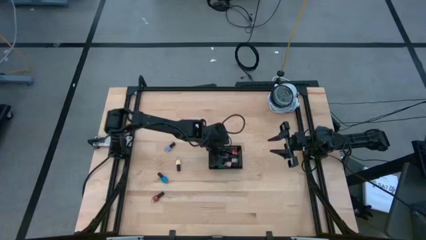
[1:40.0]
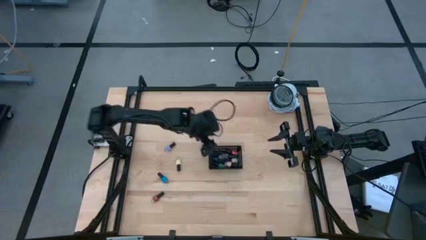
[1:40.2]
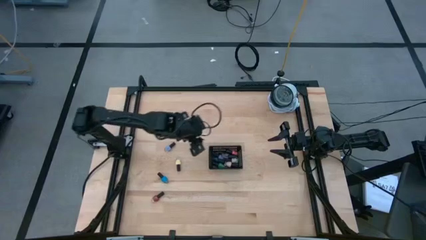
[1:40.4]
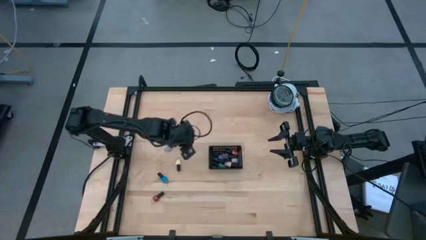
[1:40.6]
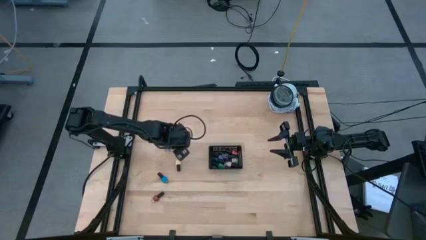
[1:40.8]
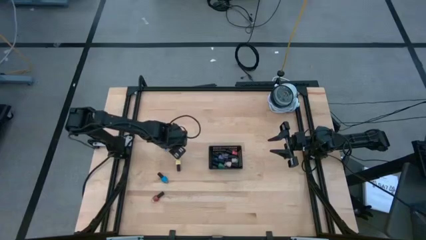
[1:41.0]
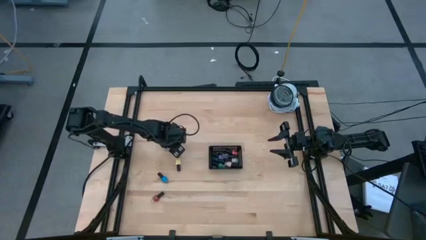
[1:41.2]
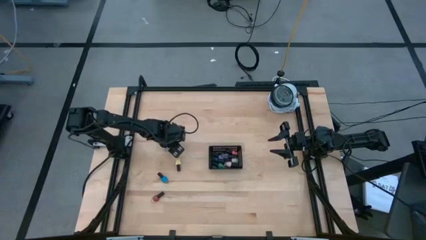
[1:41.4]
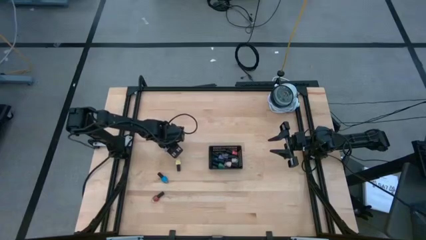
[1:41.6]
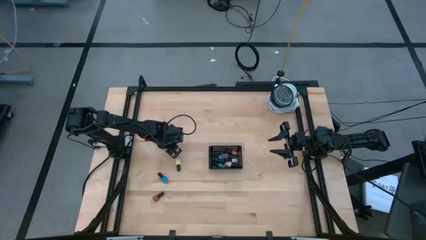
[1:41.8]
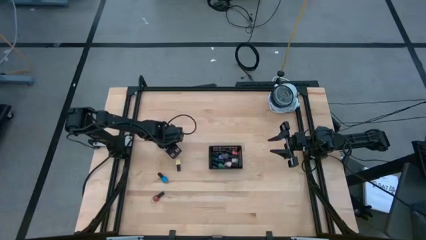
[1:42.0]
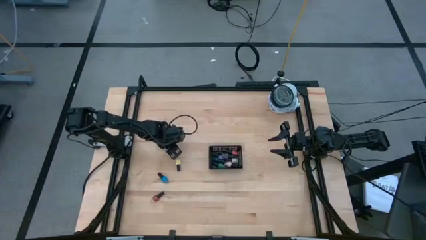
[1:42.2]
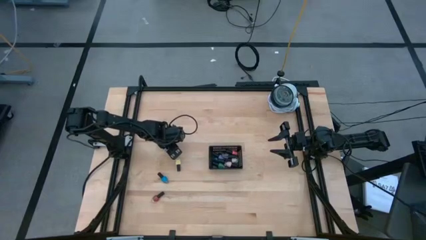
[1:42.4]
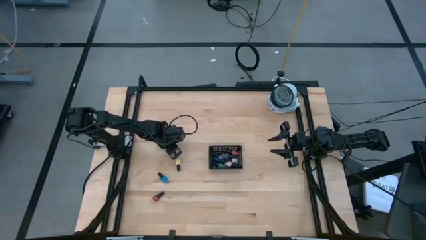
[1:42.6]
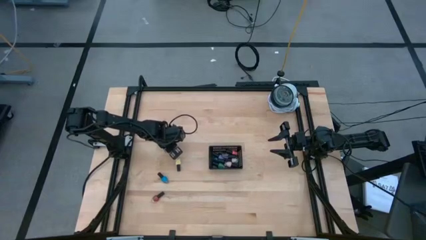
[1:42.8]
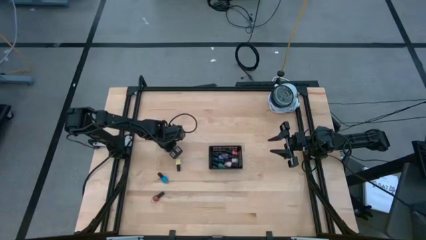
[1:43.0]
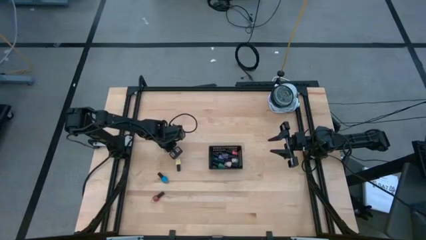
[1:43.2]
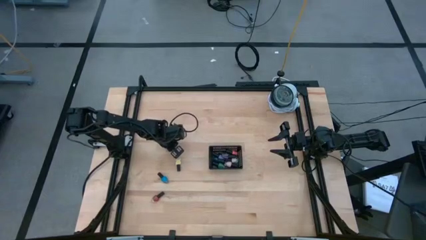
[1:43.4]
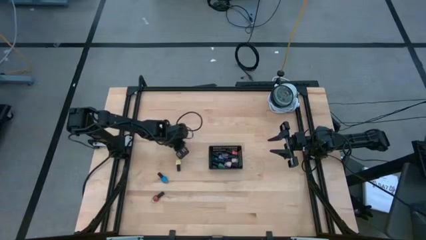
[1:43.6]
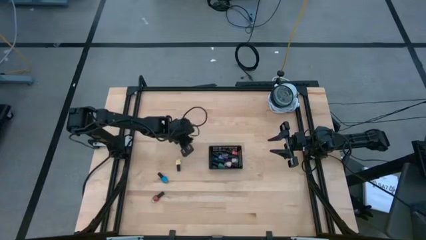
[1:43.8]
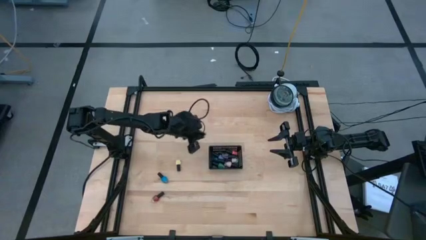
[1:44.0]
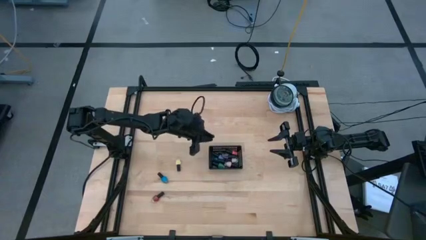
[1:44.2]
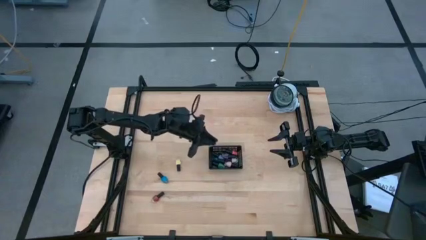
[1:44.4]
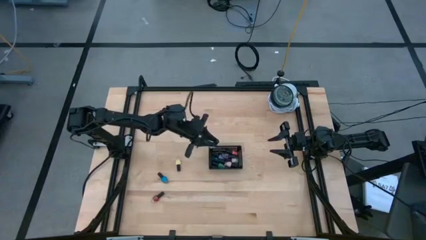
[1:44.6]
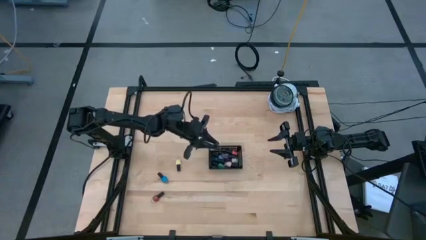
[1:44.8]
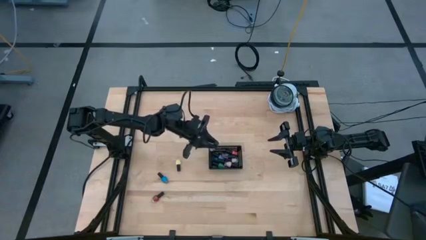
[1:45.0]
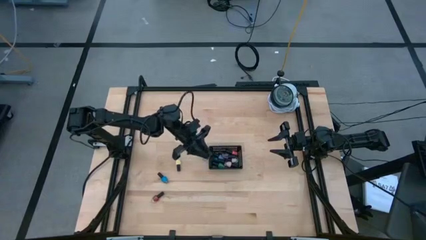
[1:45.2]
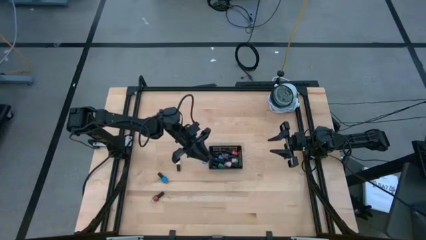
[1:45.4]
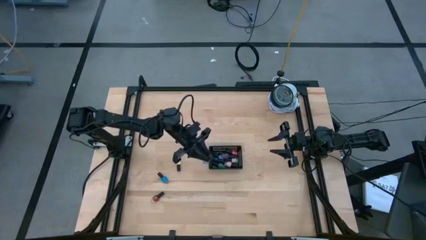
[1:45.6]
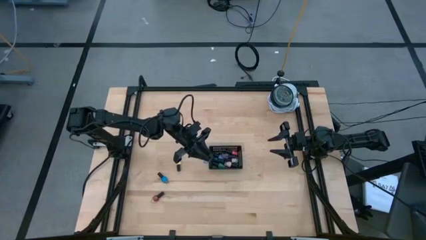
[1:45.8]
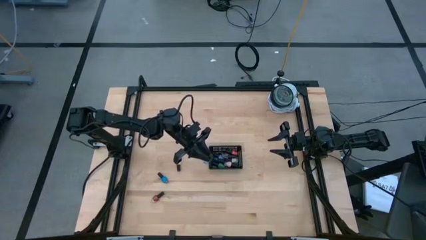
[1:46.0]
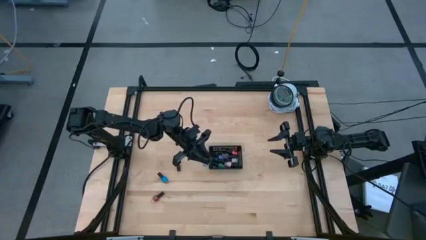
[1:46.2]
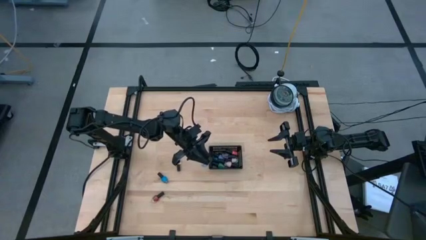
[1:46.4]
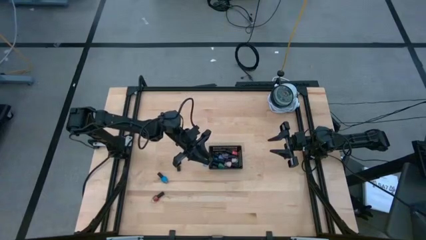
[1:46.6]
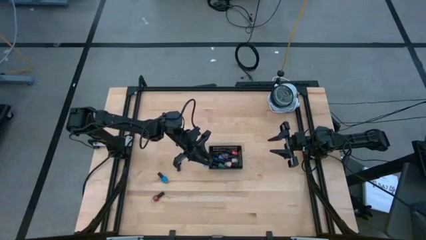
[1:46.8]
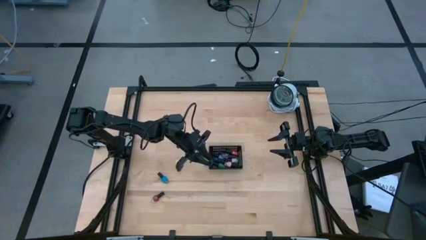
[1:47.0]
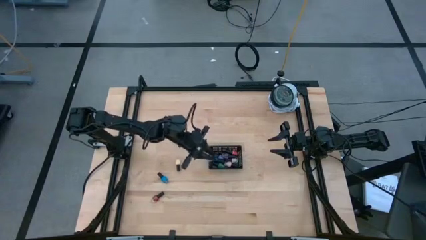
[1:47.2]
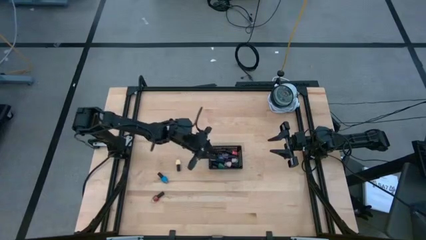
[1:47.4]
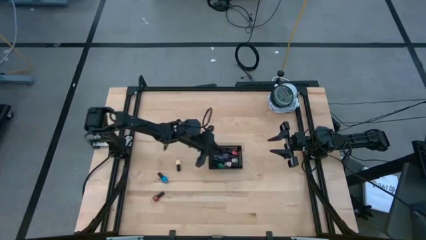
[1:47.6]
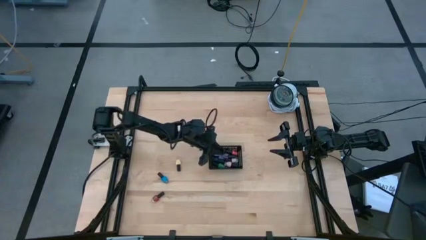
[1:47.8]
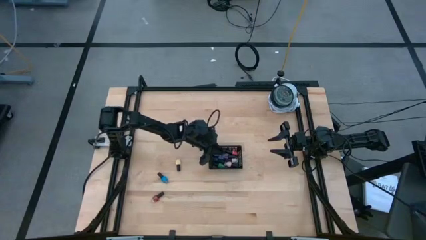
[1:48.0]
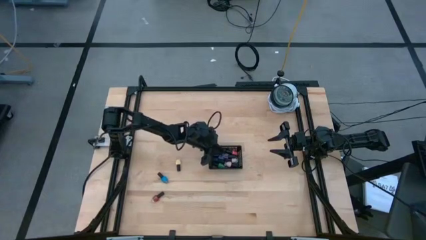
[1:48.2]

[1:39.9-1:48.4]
Task: Pick & Place Nail Polish
Put the light blue nail polish into the black bin

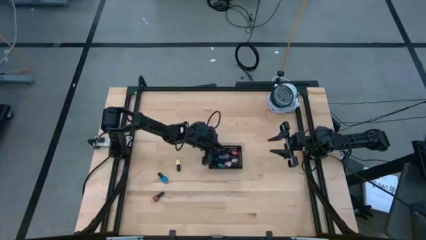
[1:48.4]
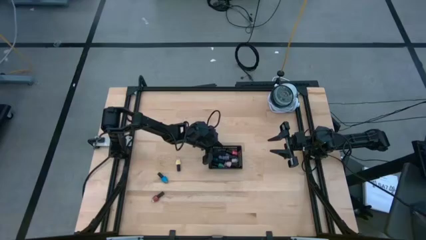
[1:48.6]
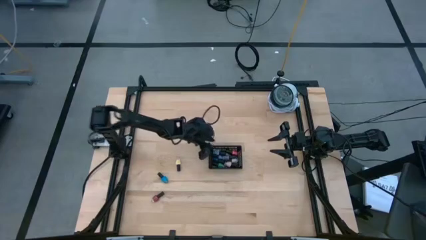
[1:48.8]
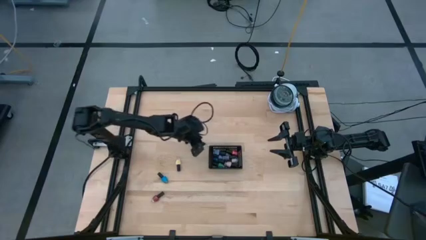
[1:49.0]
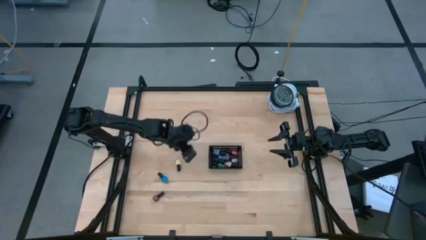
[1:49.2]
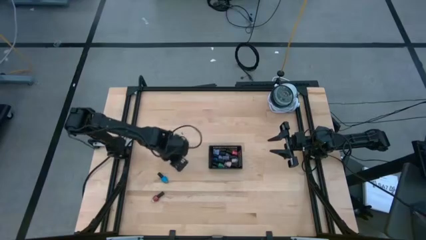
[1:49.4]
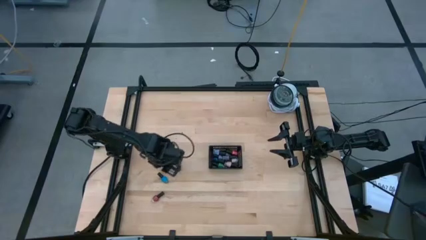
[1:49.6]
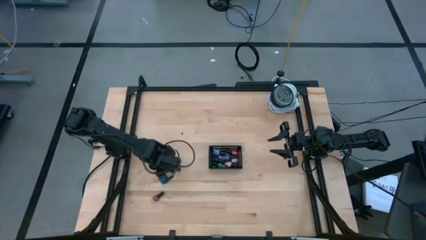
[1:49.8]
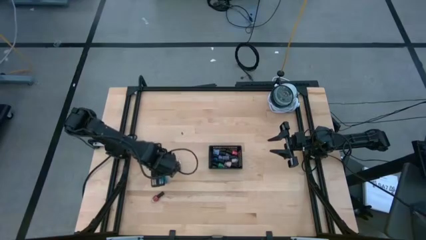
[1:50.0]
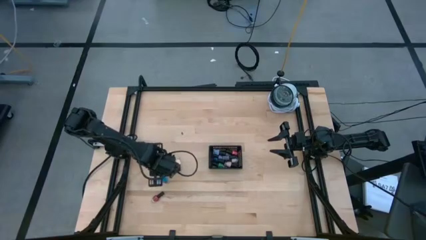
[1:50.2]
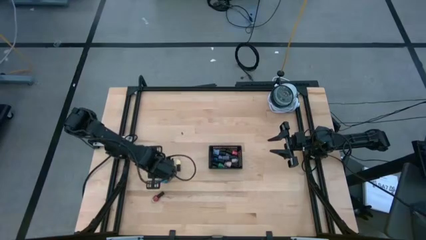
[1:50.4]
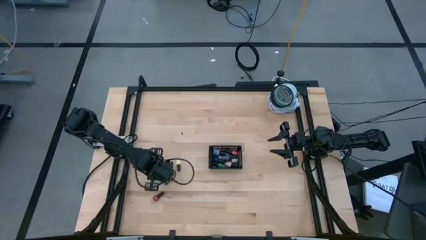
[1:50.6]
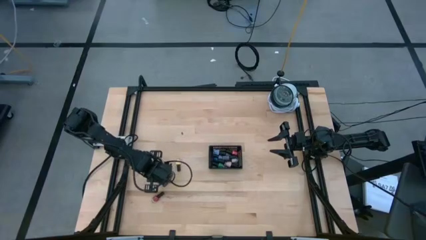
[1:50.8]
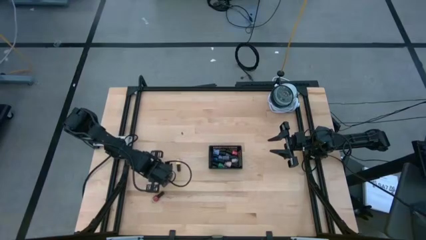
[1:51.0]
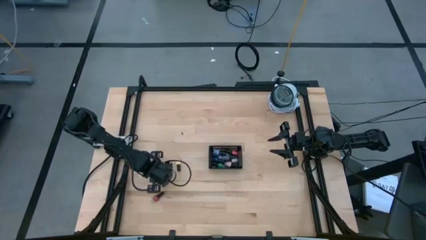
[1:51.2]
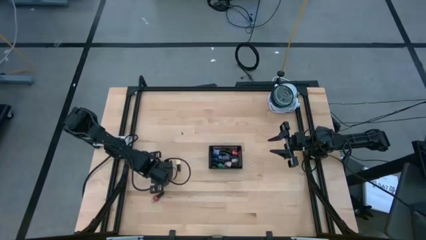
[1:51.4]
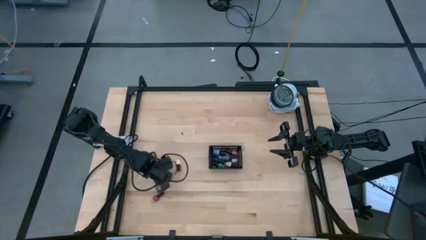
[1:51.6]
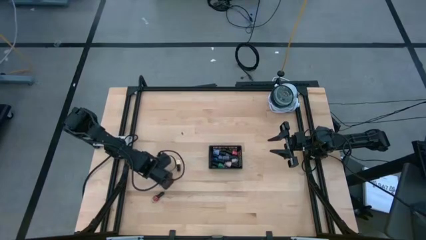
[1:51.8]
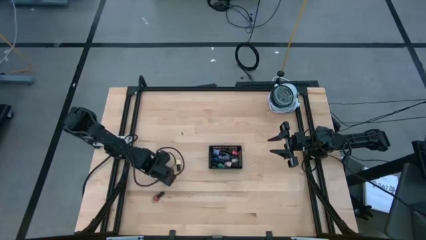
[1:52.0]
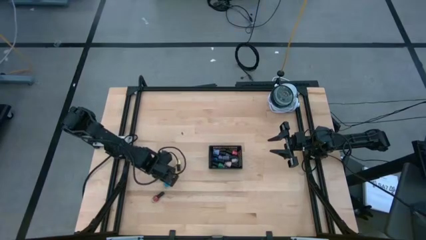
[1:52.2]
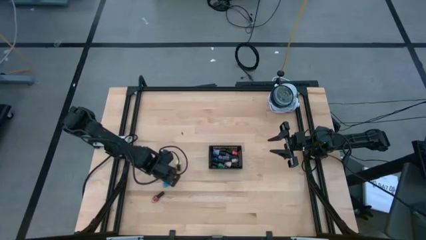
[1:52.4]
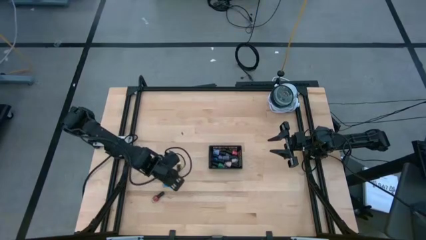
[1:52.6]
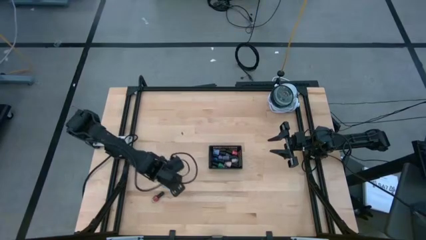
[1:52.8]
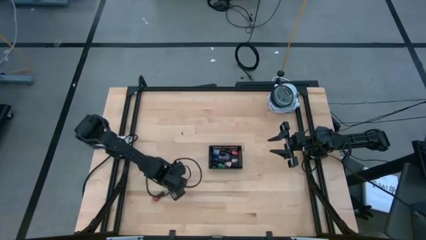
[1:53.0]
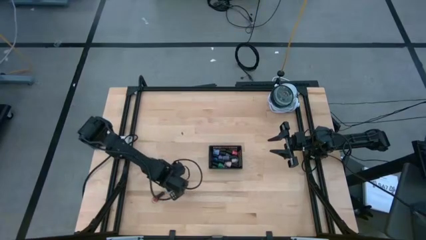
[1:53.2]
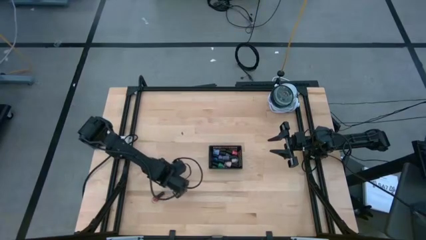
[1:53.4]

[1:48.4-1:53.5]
Put the blue nail polish into the black bin

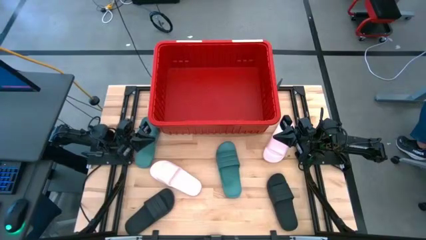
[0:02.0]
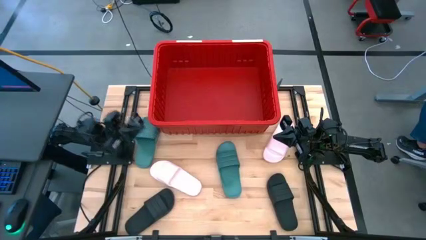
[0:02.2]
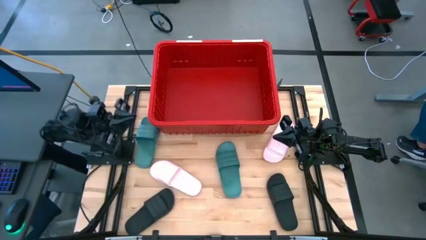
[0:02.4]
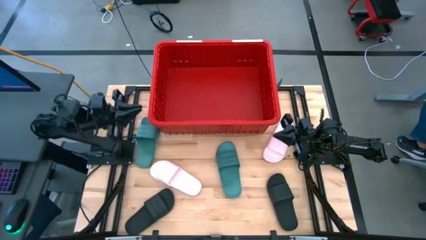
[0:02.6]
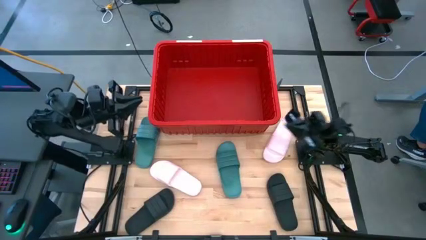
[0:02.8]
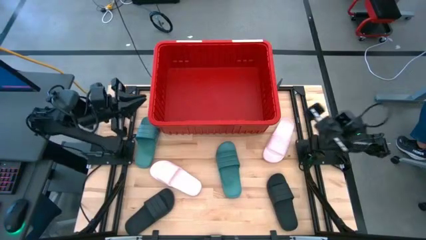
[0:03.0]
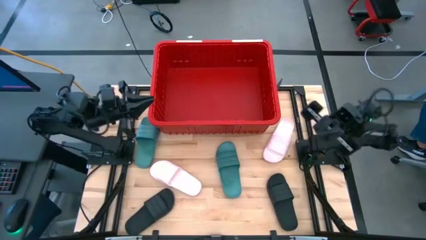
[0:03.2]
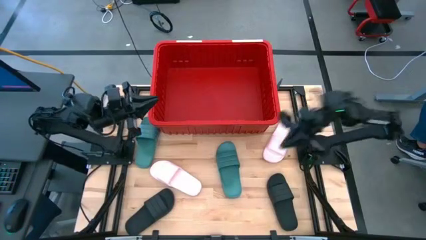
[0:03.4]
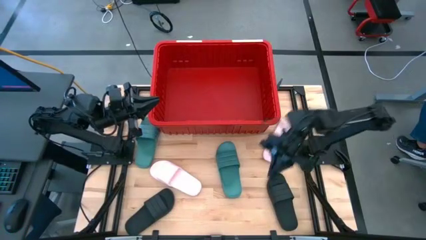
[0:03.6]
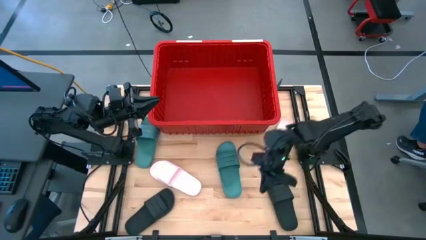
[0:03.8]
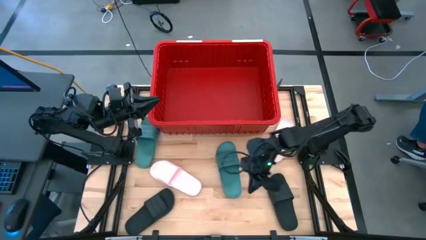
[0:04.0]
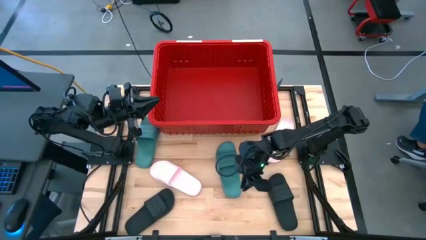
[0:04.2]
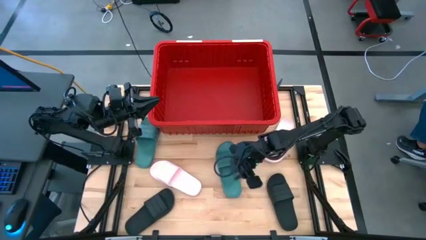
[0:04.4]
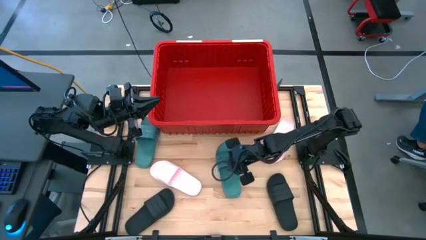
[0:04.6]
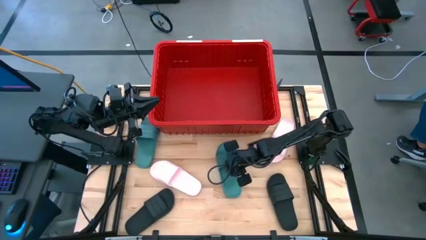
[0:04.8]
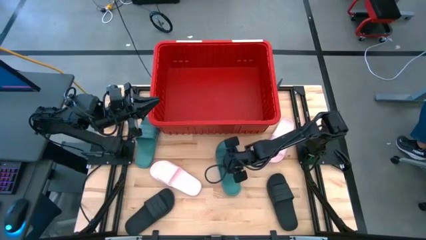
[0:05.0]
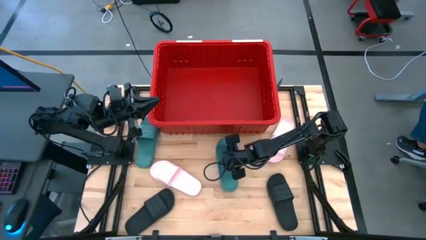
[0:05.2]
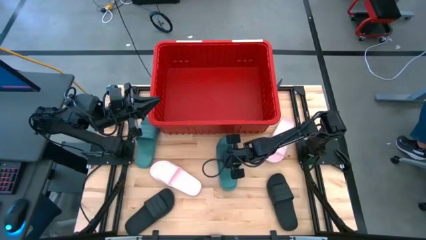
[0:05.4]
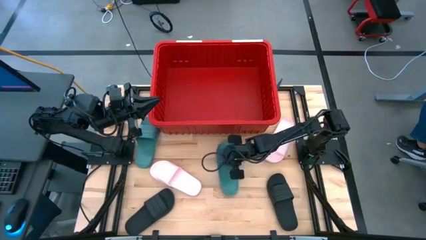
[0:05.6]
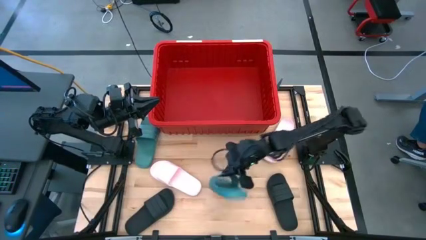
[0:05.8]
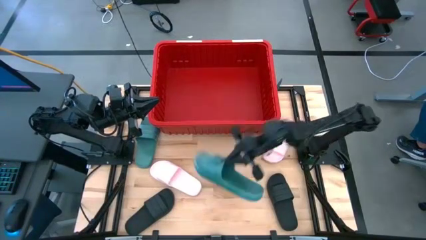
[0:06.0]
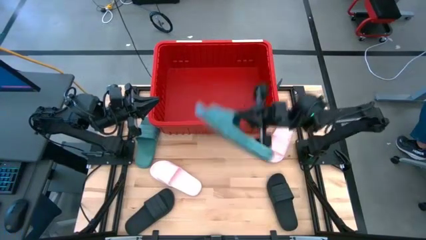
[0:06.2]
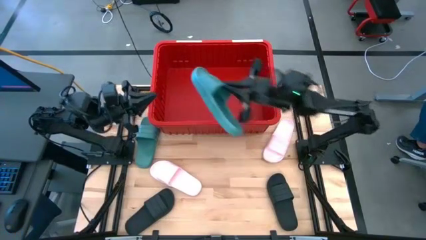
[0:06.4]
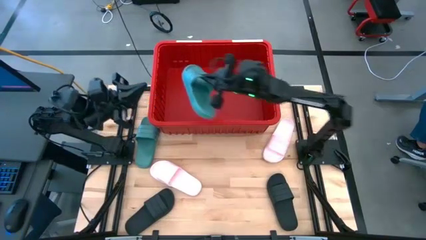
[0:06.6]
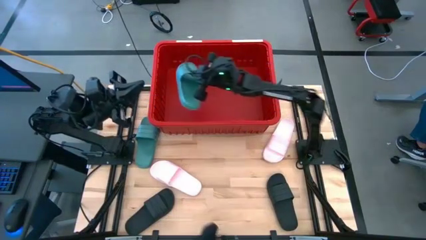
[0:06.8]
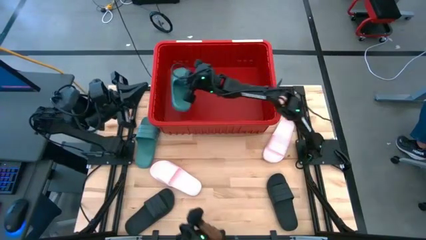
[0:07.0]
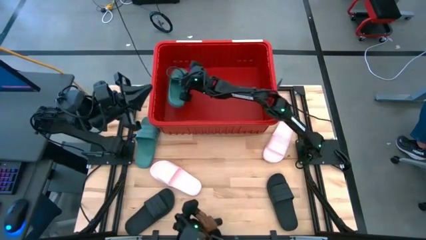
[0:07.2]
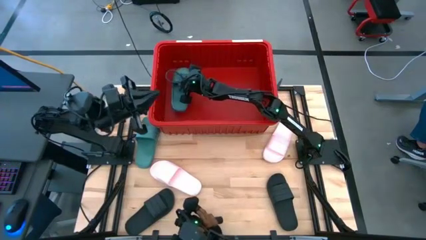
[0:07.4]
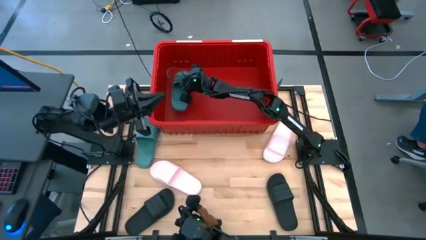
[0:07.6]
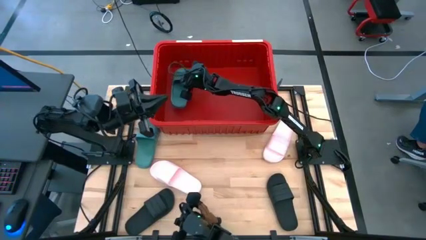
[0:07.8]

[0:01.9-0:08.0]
Task: Pick and place slides into bin
Put the right green slipper into the red bin
